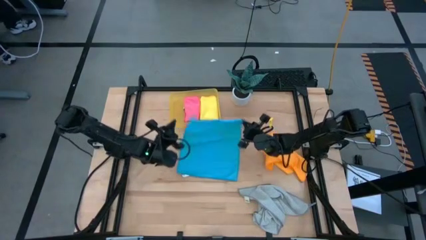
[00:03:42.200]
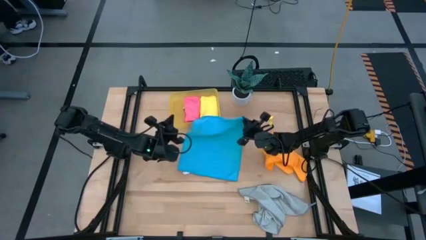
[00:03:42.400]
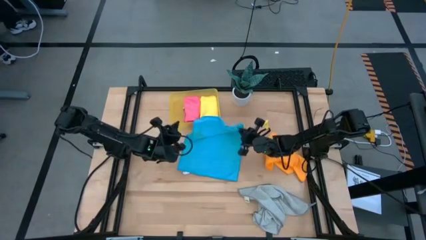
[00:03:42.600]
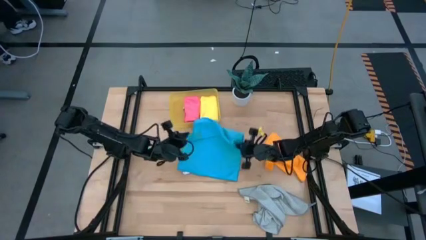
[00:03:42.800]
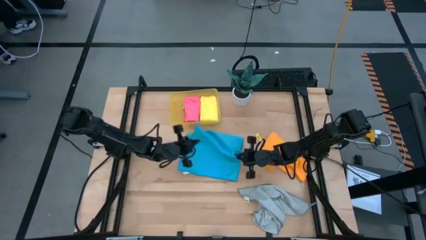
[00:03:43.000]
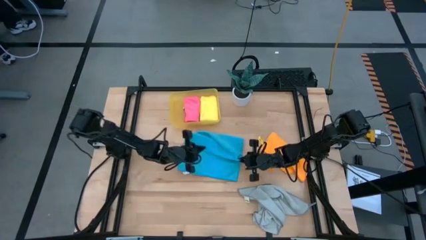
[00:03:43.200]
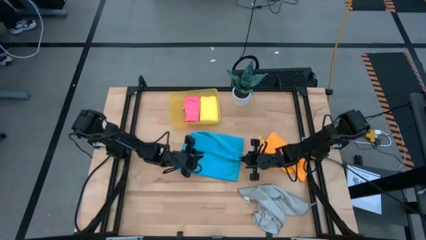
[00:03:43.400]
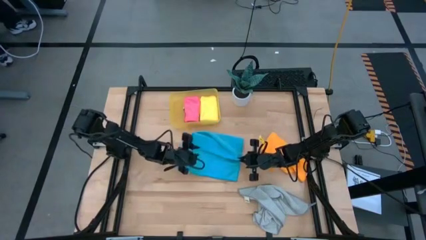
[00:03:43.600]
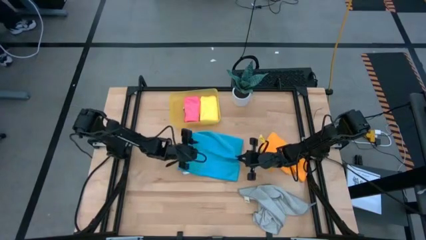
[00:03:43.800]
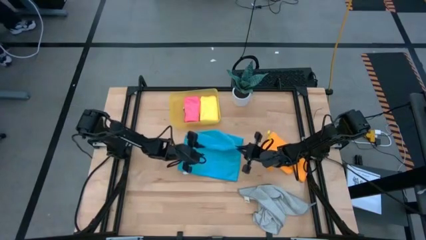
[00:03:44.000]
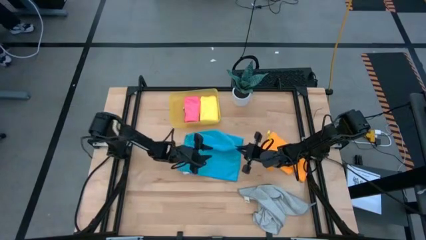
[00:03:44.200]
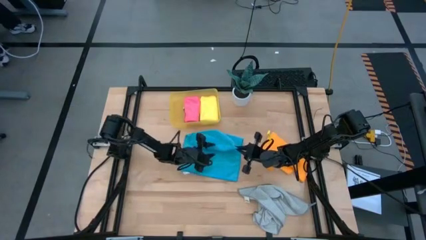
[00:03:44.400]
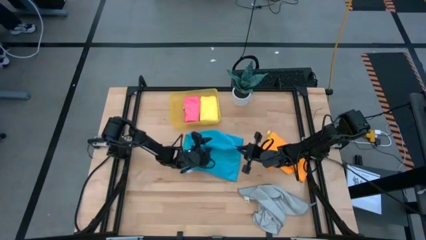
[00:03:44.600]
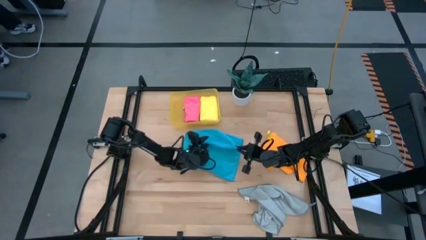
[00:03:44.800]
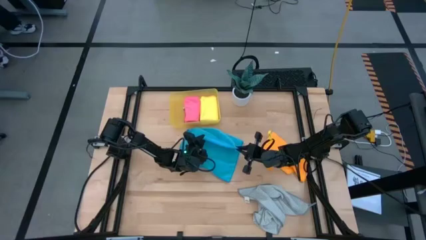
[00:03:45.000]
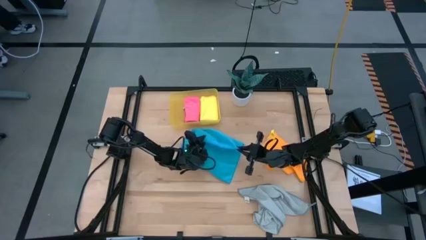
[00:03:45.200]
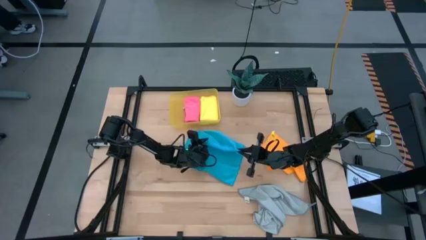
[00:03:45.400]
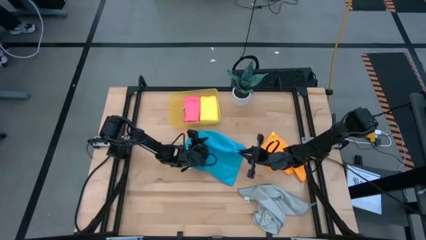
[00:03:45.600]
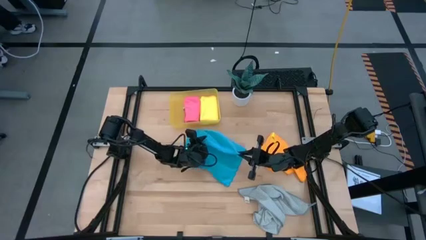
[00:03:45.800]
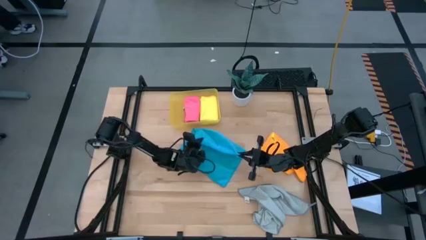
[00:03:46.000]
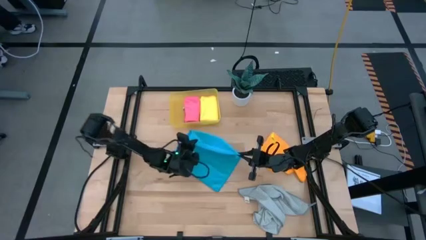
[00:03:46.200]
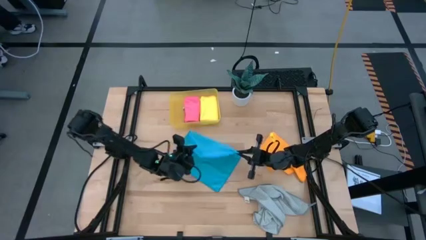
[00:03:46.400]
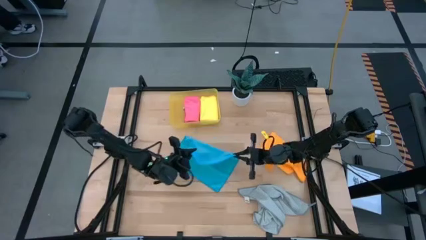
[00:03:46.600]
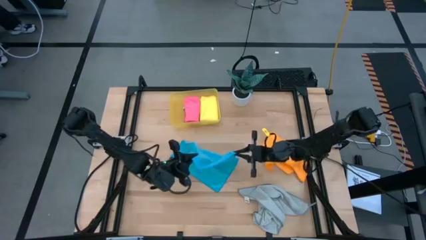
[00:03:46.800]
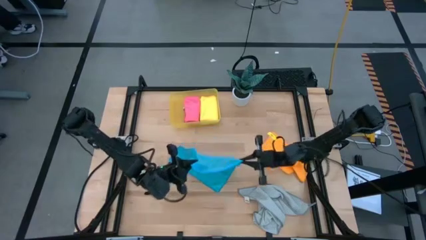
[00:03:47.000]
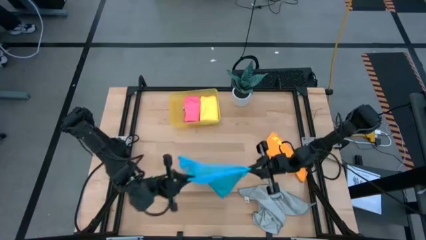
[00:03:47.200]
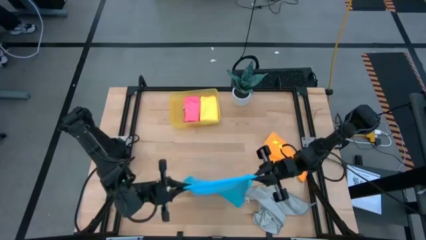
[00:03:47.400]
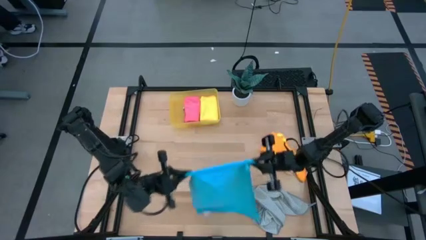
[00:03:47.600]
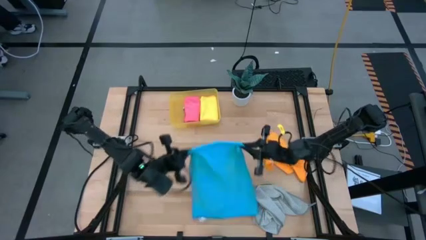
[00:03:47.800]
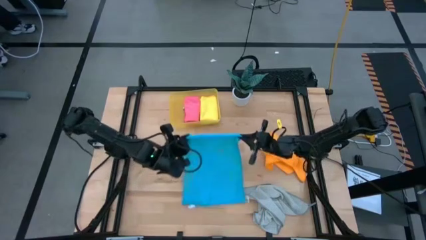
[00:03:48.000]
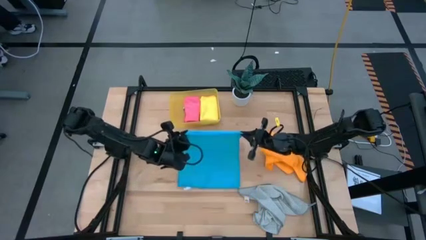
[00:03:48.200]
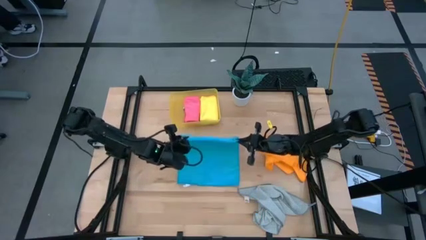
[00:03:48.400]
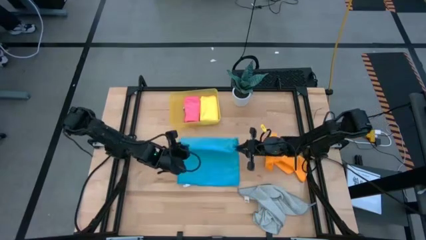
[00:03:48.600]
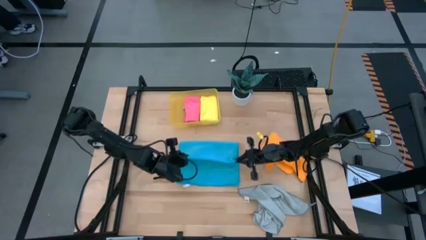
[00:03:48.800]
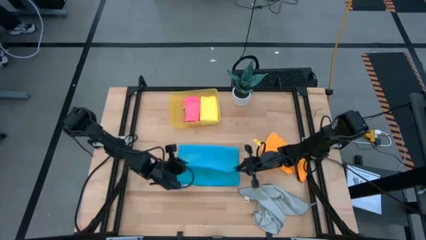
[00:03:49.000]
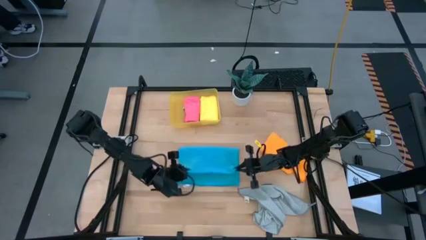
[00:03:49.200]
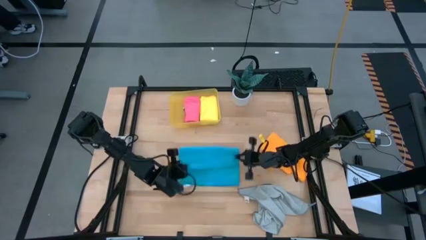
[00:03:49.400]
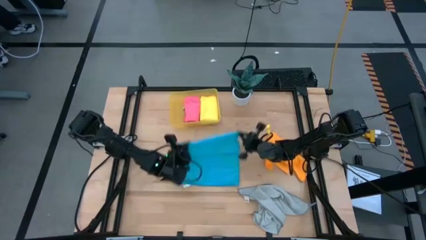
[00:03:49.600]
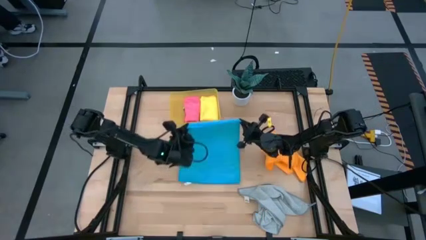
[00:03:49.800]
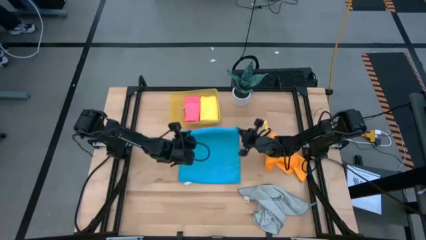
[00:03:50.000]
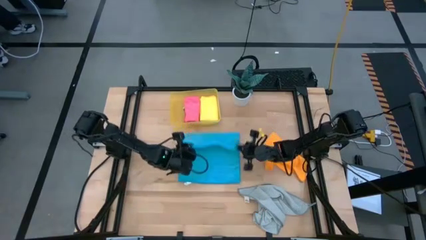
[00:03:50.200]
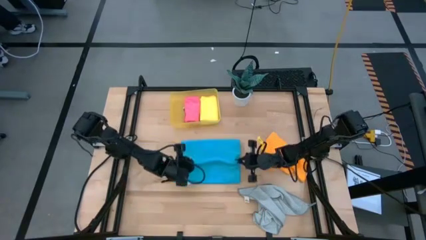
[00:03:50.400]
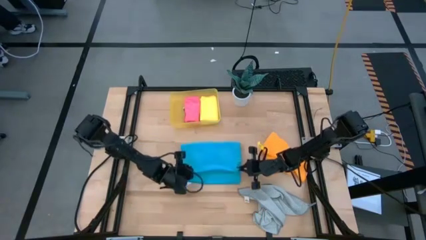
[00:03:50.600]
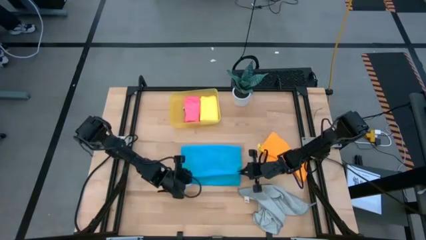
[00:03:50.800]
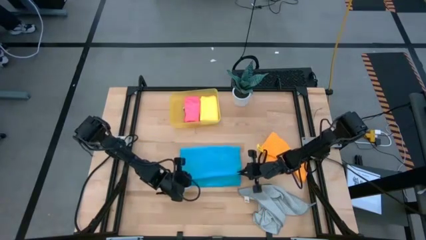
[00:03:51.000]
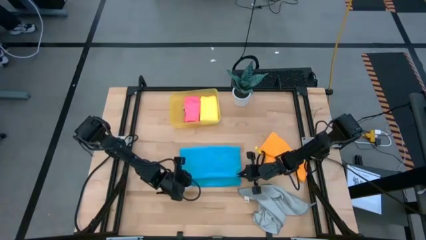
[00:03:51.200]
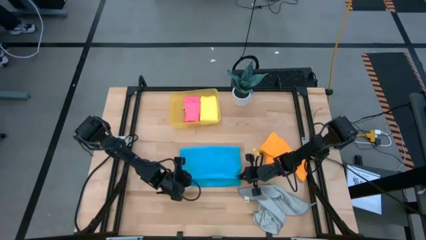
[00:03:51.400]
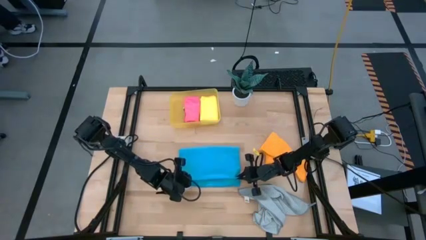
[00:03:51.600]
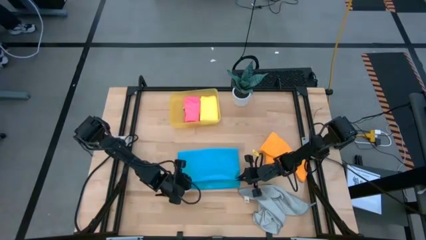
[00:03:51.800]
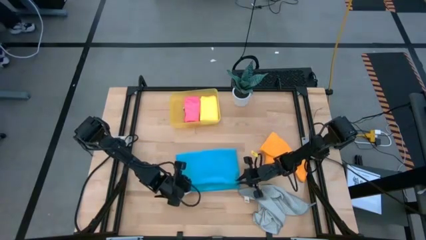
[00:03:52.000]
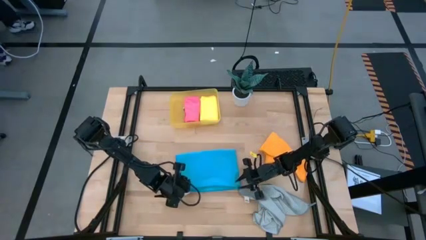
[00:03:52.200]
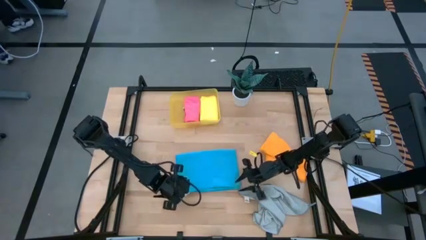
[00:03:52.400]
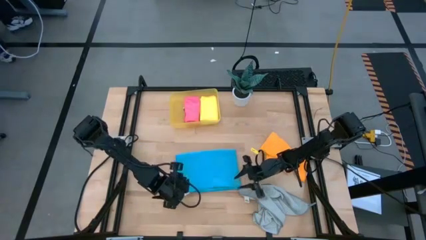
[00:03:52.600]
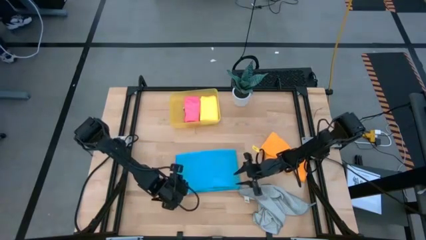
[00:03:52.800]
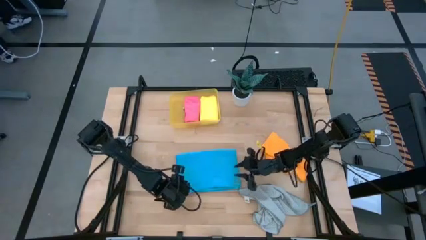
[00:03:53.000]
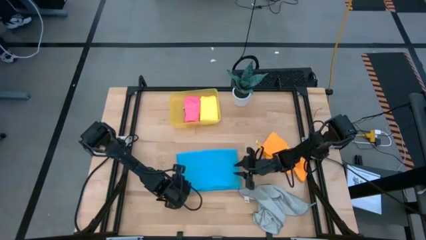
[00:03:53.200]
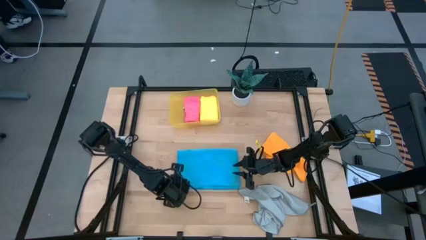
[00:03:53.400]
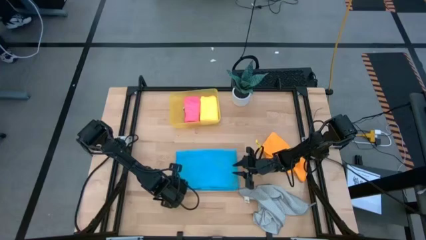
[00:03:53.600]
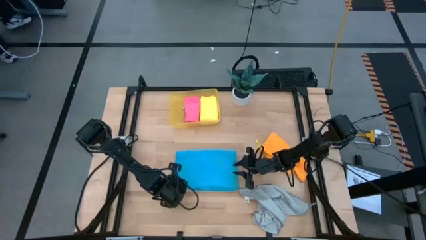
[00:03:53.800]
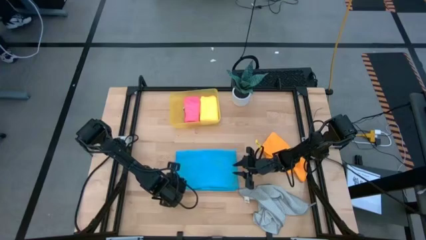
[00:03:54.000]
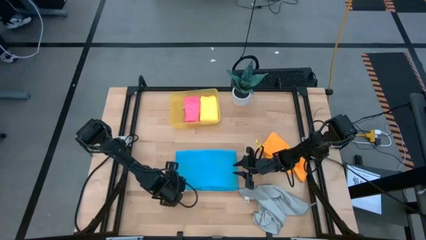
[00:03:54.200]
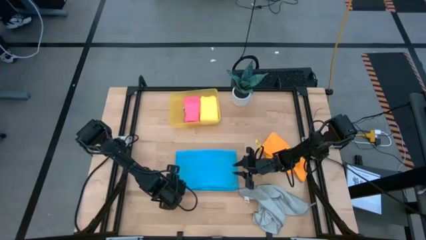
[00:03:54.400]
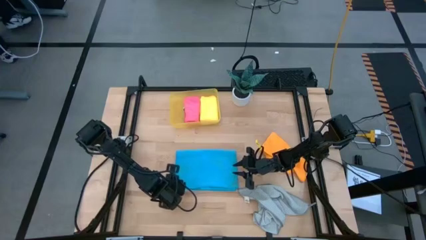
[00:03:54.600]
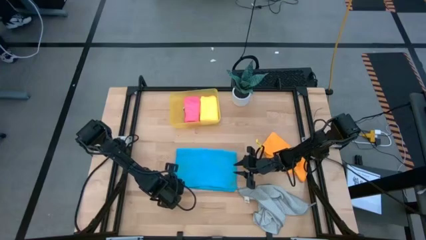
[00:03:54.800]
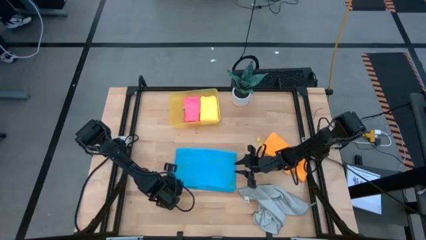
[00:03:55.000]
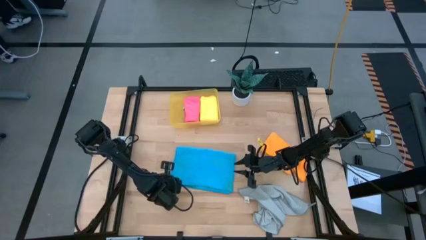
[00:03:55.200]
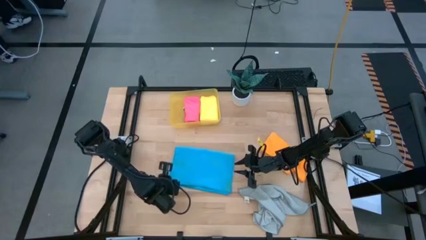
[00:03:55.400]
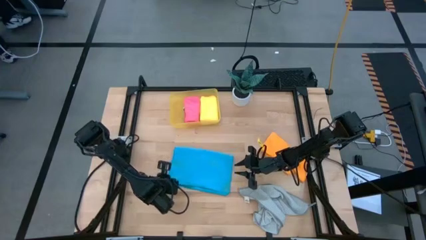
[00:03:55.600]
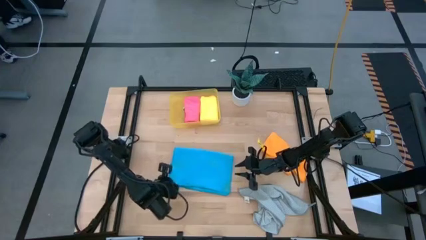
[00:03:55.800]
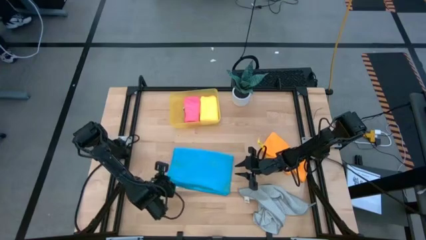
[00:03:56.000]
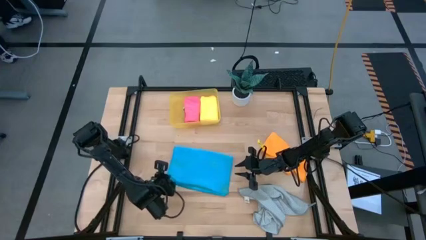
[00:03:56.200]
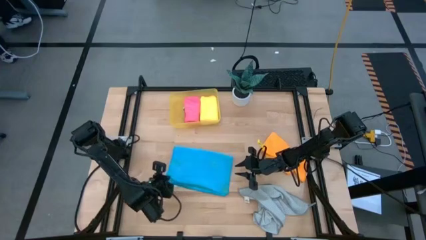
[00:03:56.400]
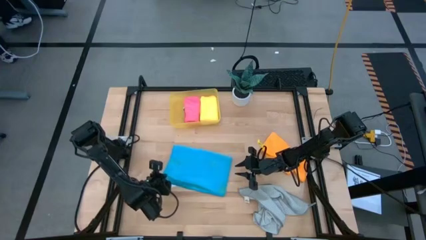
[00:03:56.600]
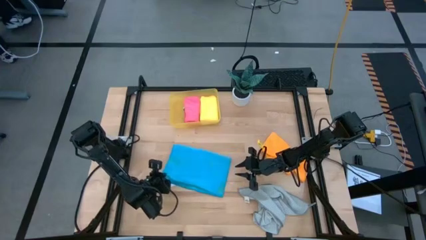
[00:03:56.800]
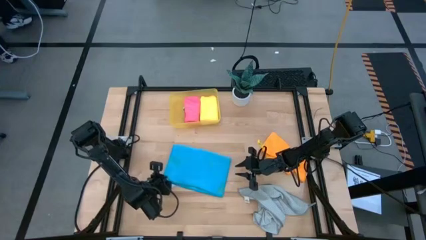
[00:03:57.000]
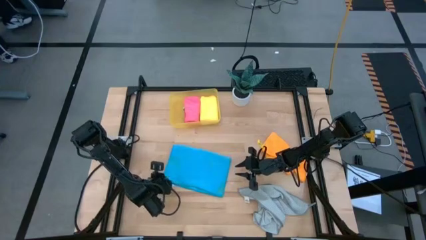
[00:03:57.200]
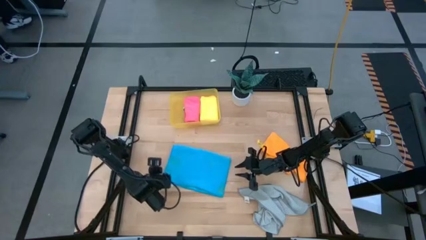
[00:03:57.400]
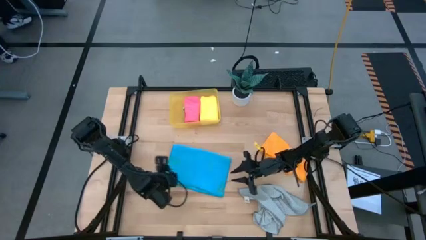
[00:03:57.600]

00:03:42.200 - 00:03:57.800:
Task: Fold microfiber towels
Fold the blue microfiber cloth

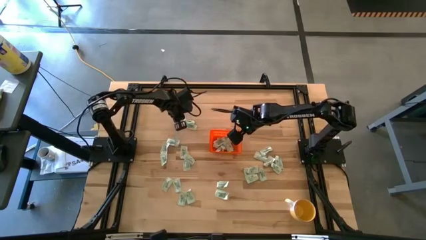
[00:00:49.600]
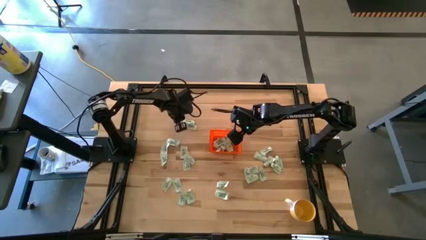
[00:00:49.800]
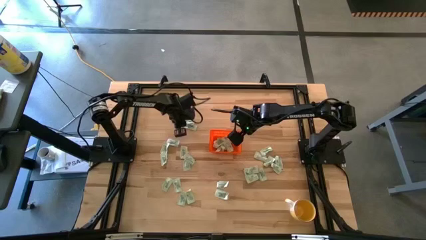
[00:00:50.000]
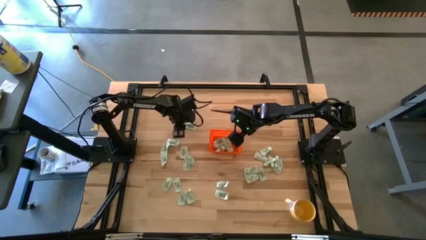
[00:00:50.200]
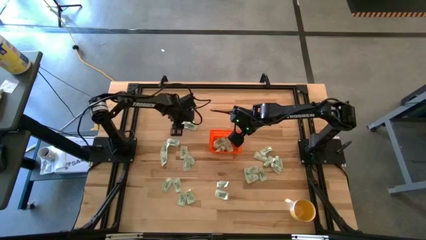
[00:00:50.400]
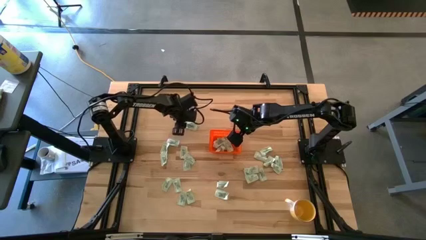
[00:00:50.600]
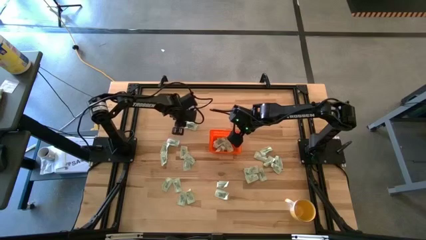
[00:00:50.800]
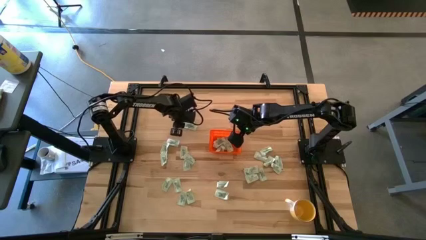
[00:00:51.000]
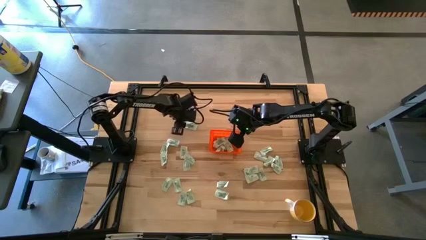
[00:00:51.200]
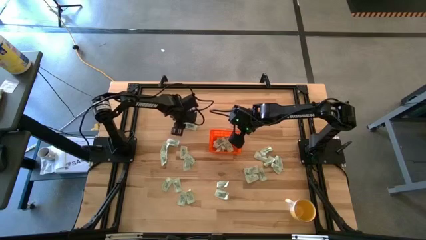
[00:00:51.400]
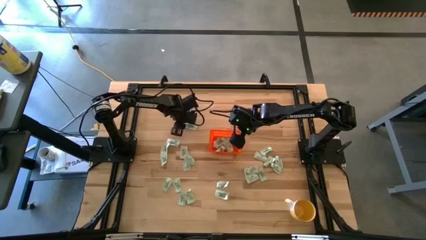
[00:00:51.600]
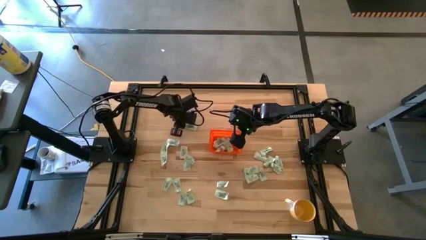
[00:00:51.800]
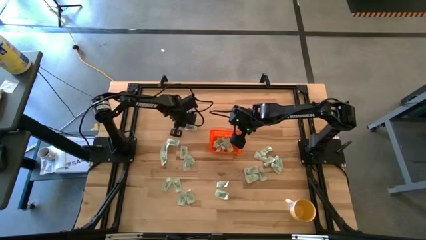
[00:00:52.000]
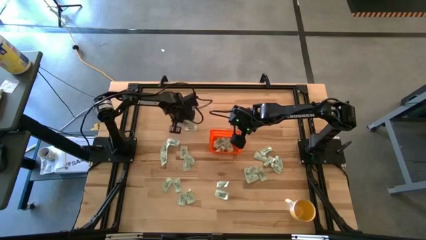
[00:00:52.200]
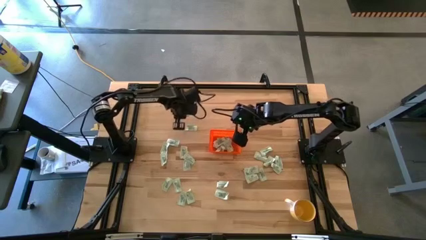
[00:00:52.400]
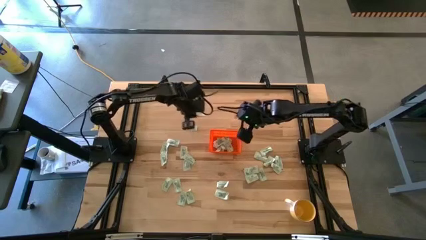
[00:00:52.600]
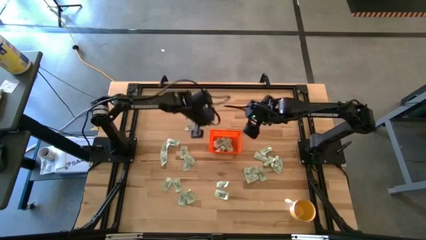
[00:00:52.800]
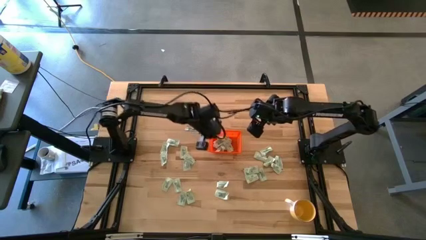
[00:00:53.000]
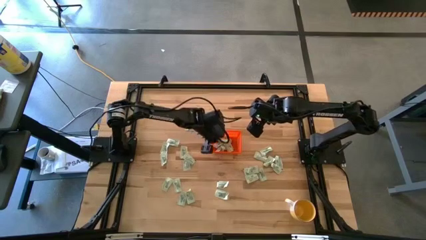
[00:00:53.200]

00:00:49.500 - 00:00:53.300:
Task: Pick and place Stevia / Truvia into bins
Put the light green stevia packet into the orange basket
